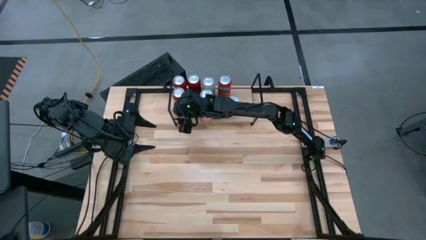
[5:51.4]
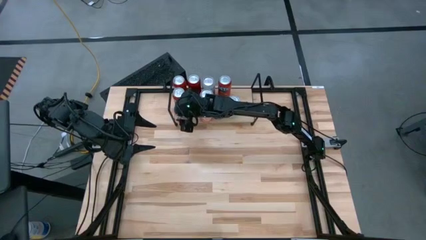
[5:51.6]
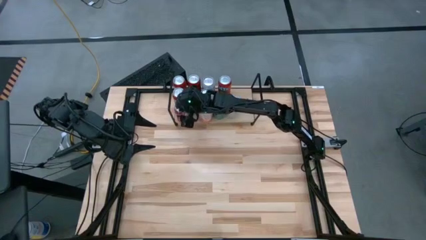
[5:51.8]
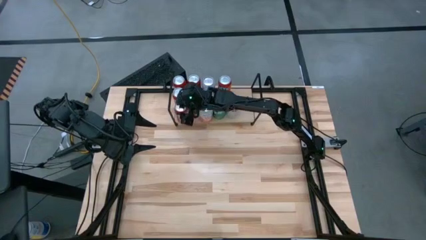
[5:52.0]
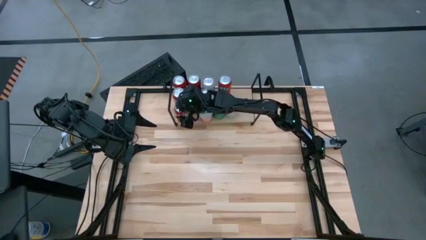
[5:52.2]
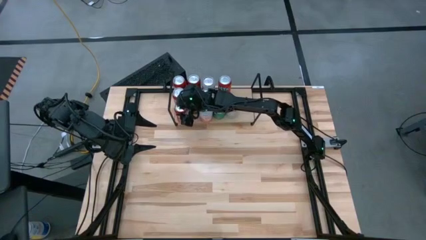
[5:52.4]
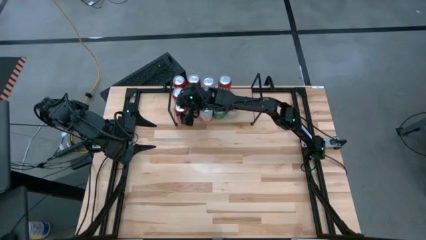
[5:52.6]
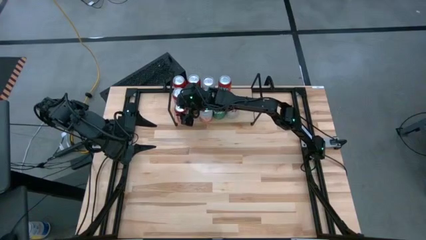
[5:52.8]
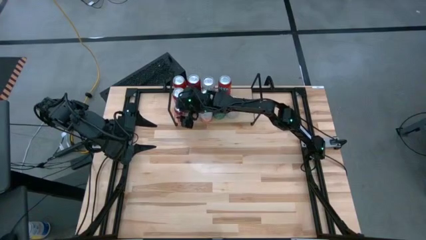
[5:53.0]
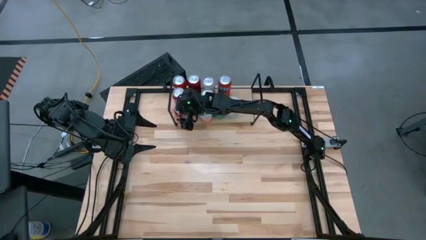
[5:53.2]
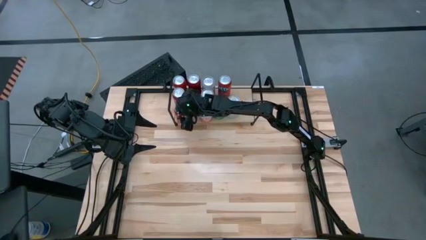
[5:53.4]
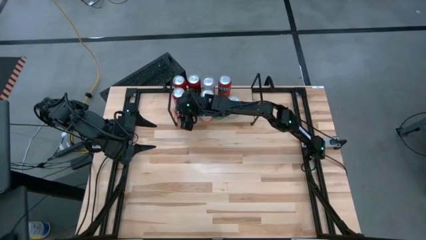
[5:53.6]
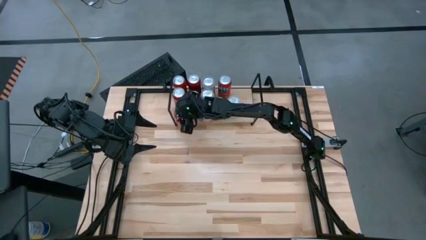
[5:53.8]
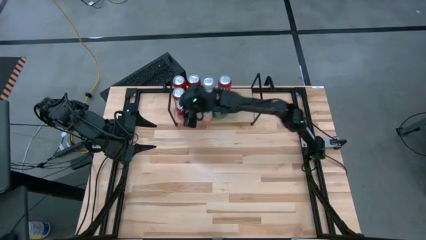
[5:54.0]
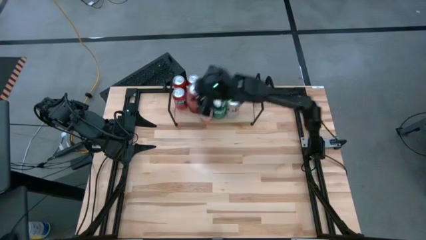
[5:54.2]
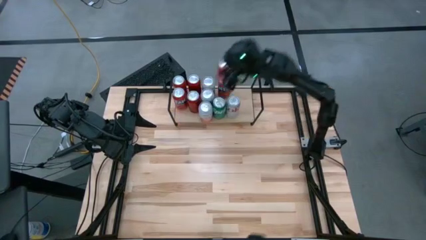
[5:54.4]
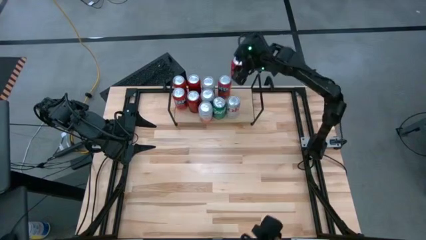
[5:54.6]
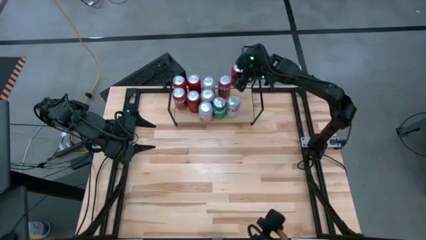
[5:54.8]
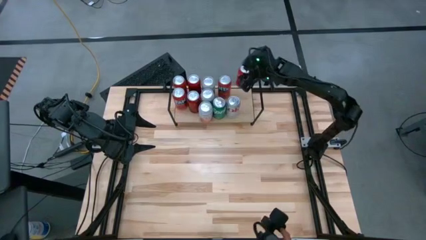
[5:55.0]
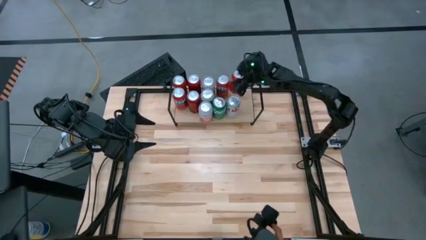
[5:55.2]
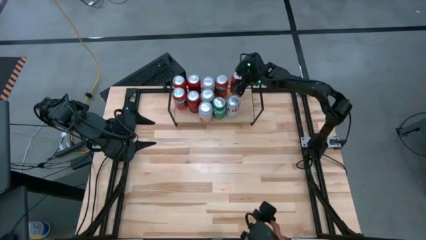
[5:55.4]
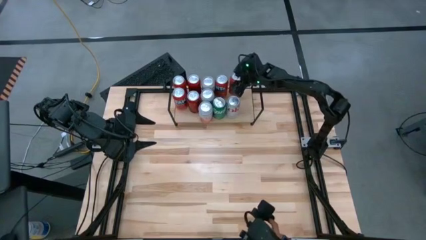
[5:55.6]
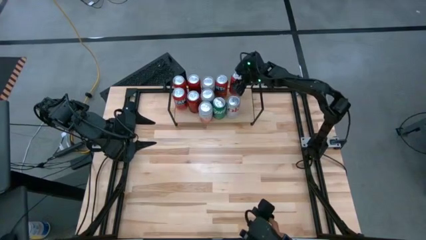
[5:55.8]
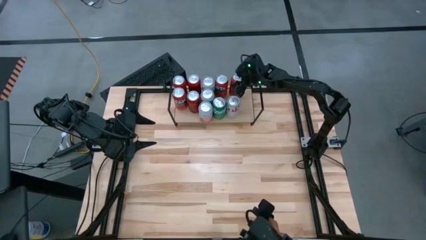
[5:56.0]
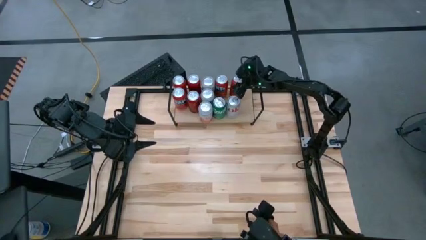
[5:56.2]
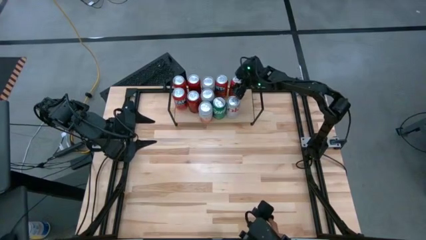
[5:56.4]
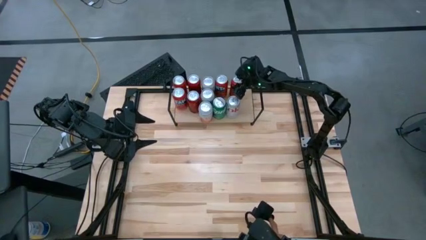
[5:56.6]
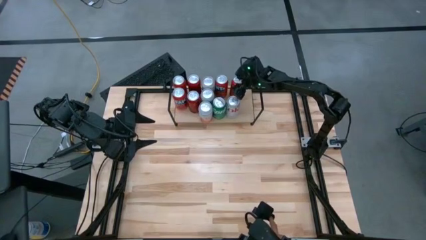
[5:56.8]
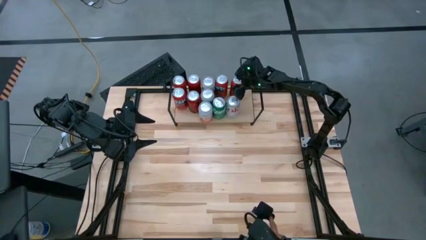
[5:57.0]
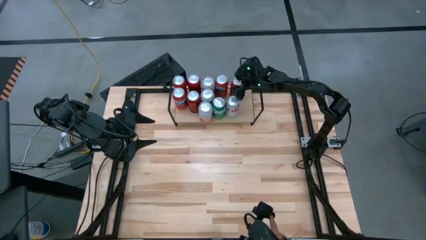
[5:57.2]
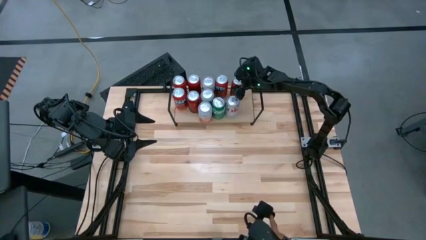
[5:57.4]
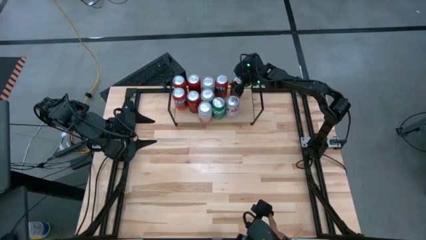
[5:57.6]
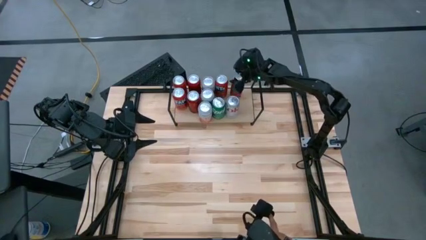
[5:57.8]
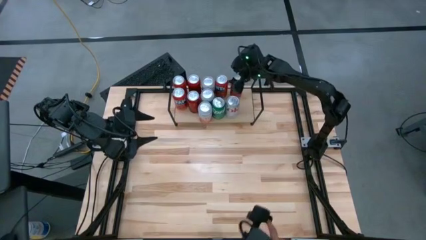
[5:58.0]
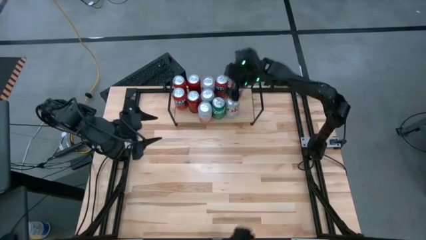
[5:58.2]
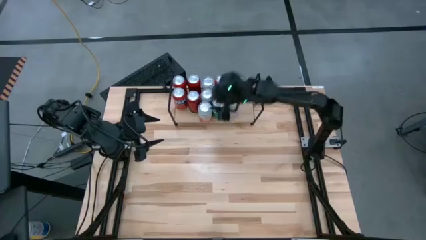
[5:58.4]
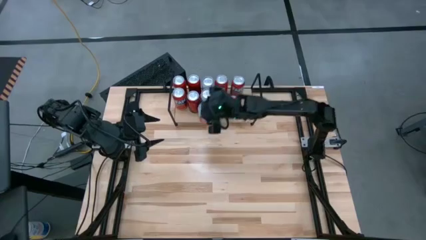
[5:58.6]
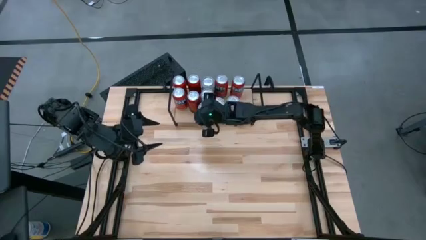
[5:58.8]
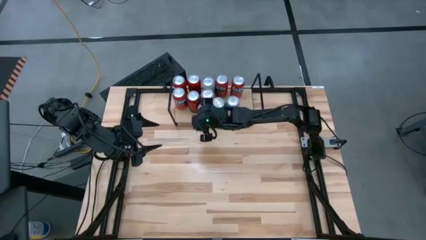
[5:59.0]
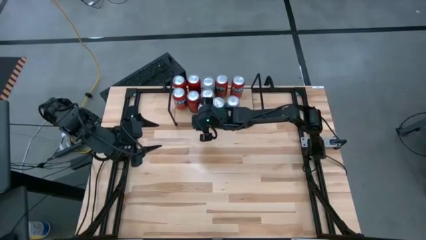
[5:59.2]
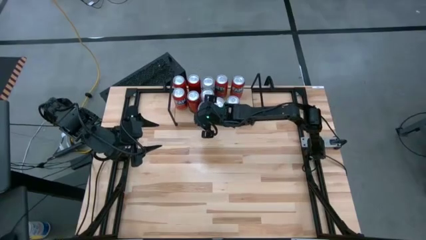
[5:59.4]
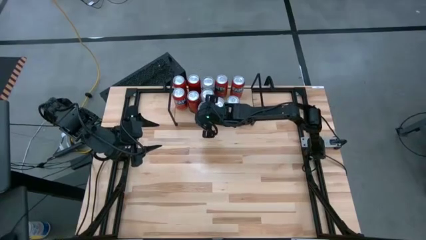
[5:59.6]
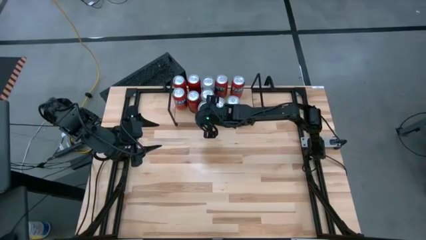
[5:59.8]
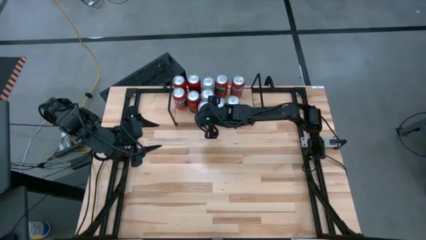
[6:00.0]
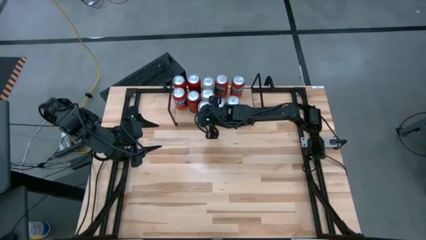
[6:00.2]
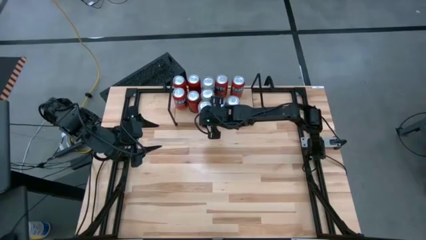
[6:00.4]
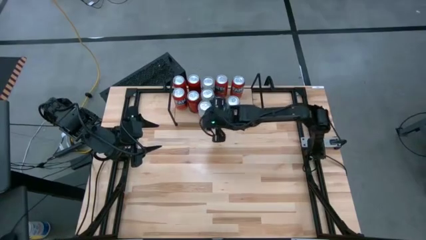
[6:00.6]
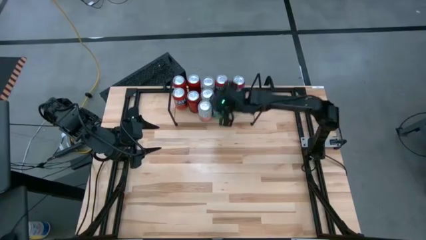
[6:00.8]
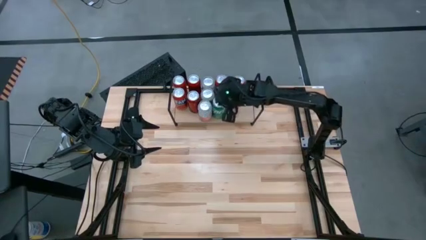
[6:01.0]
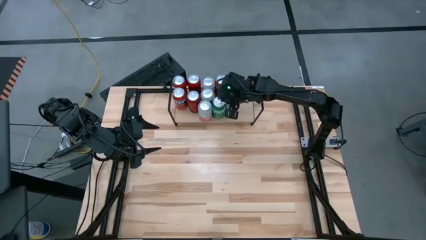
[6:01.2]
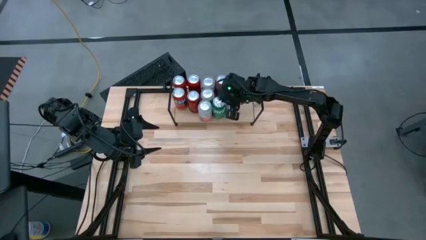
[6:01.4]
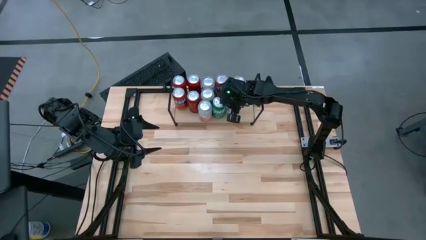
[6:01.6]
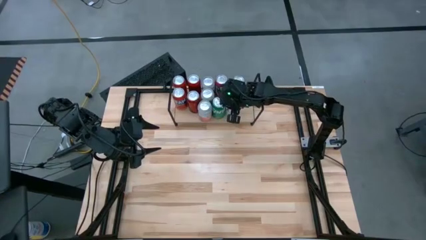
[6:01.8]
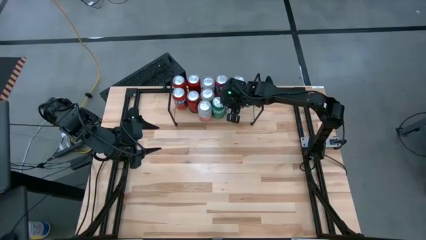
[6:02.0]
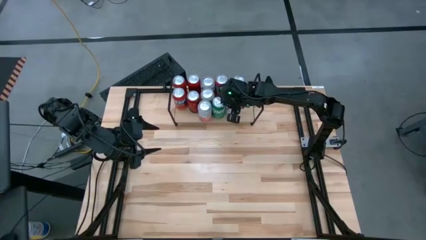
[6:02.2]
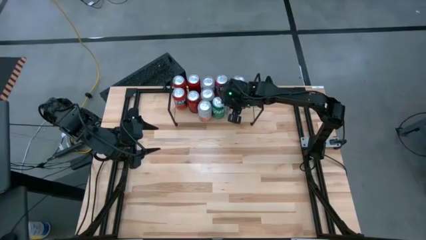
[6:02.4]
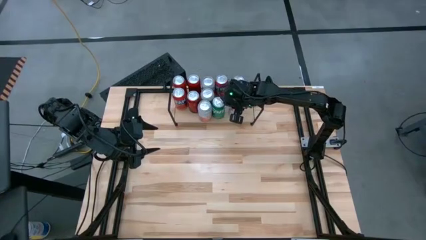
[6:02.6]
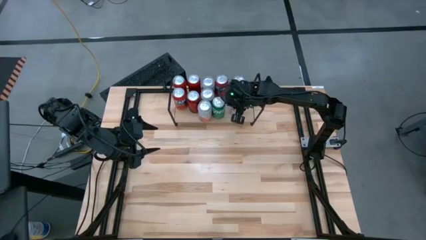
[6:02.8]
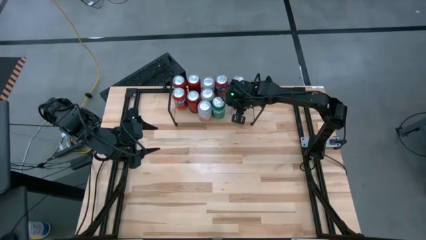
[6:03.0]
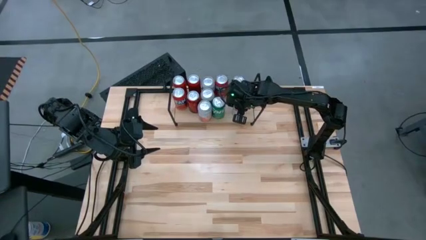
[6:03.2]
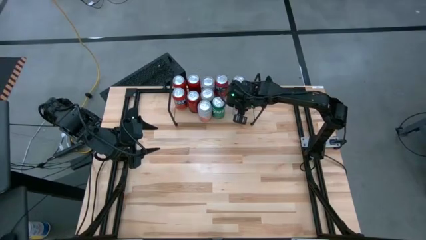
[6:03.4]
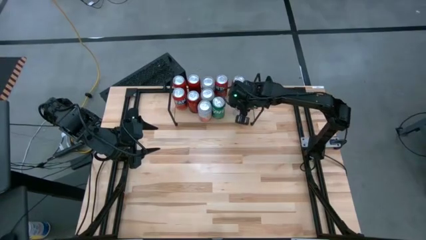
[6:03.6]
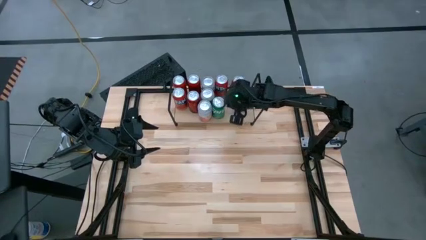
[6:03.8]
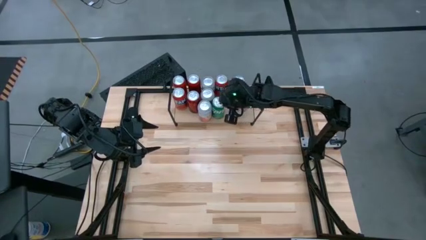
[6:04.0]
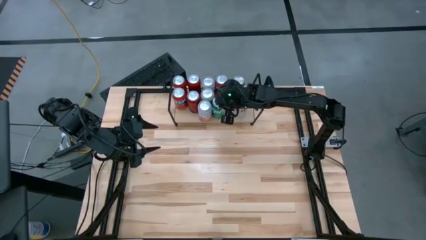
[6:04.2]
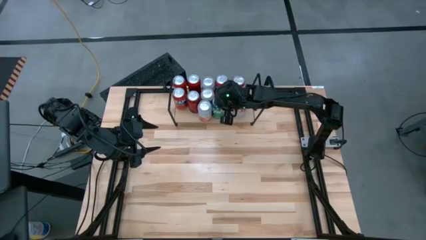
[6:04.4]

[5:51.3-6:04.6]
Task: Place canned beverage on shelf
Adjust the soda cans on the shelf

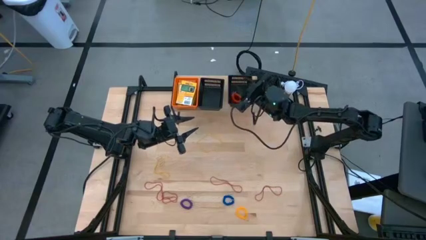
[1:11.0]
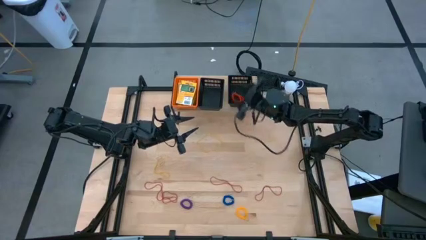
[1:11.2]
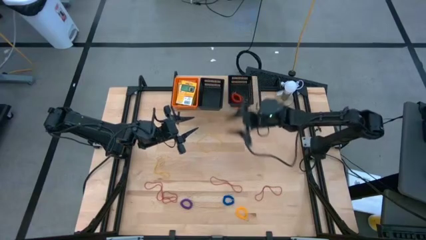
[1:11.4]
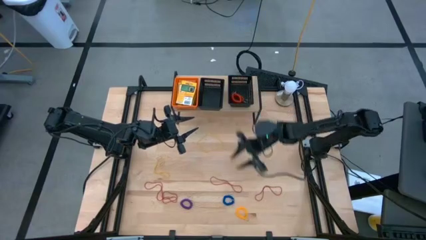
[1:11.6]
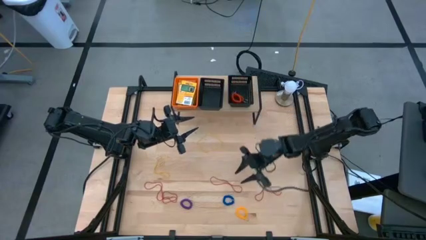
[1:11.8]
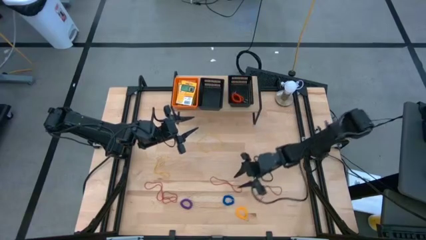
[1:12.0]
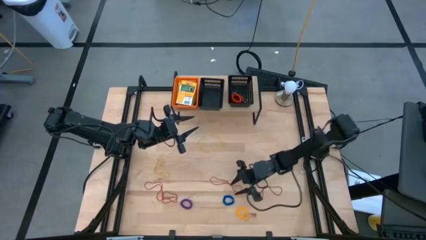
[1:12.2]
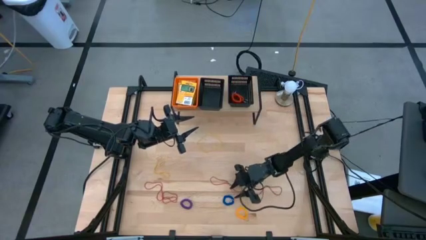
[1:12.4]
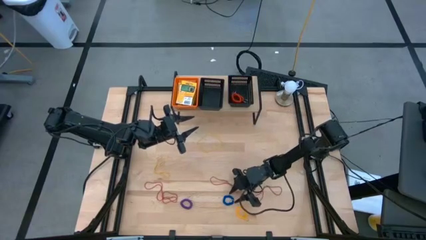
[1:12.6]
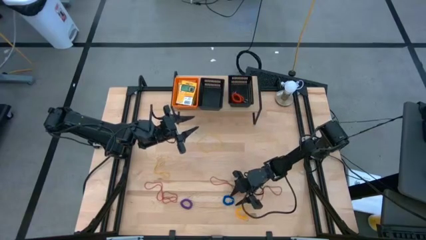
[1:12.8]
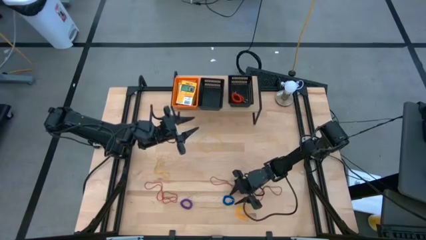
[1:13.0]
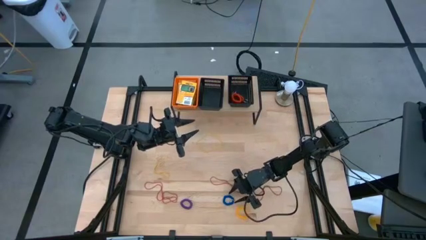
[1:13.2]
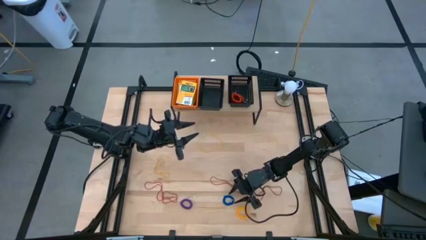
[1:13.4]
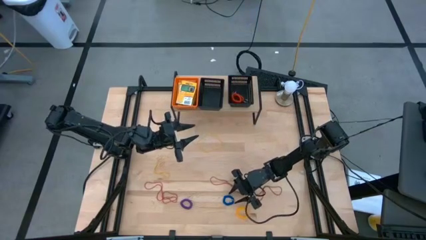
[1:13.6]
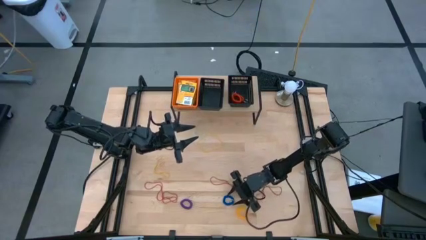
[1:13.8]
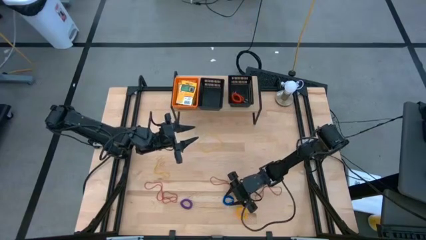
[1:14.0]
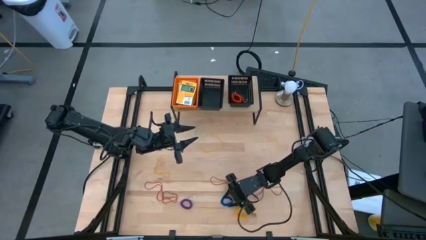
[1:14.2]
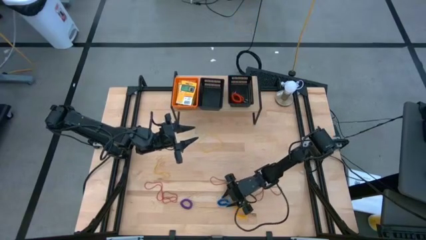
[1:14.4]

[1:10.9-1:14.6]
Task: Pick & Place Office Desk Supplies
Put the blue spring keychain into the right black bin on the shelf
